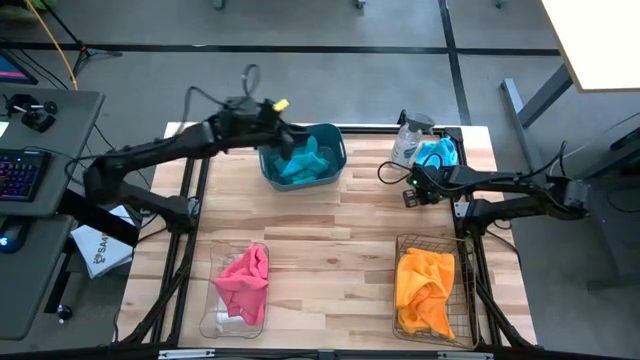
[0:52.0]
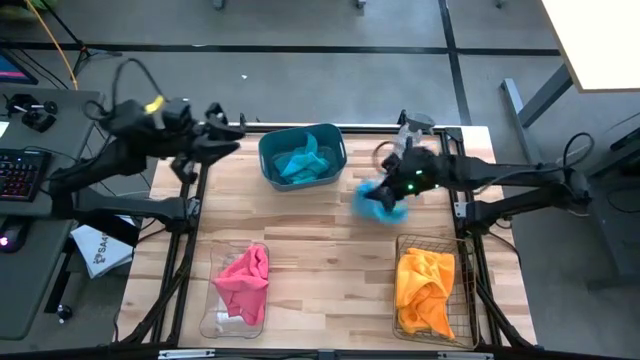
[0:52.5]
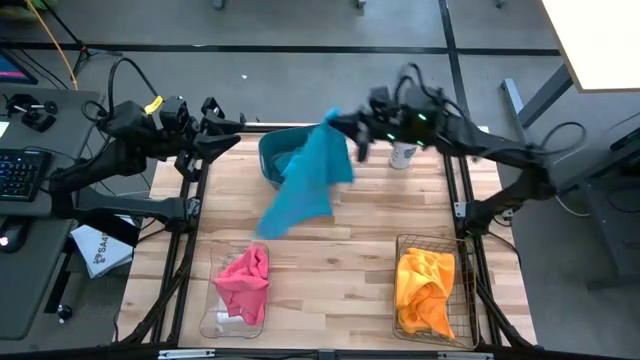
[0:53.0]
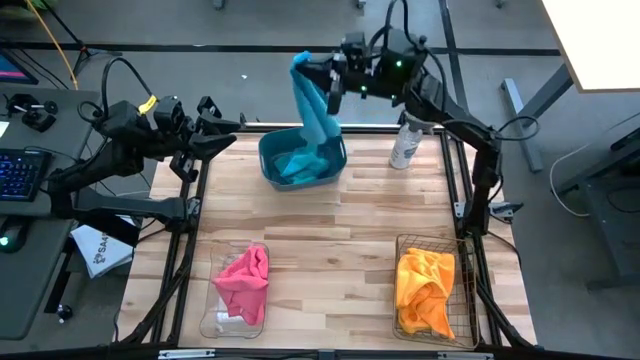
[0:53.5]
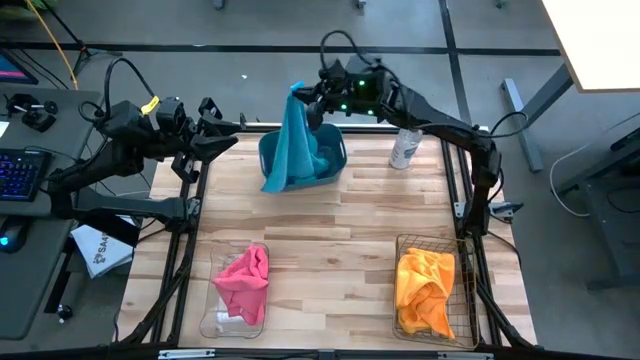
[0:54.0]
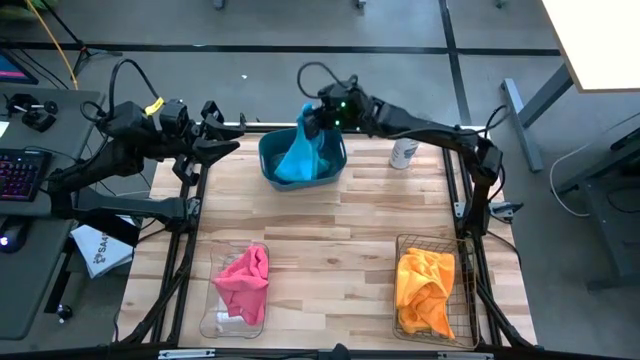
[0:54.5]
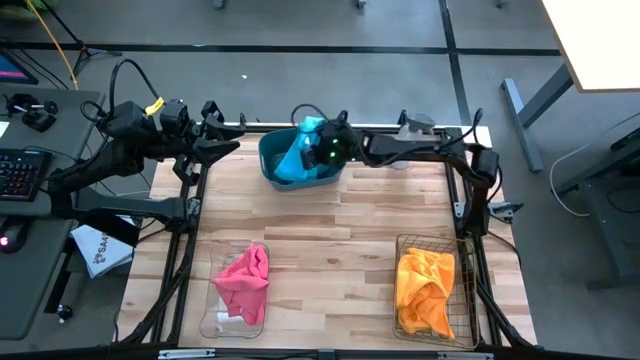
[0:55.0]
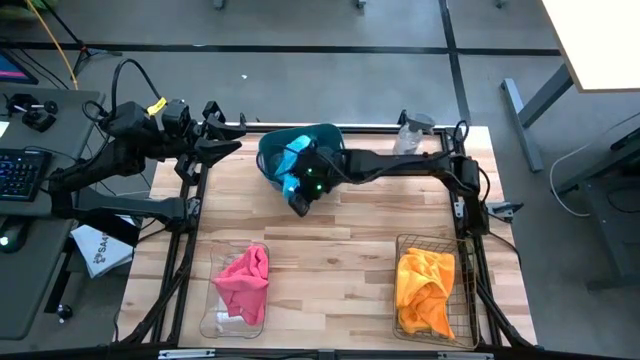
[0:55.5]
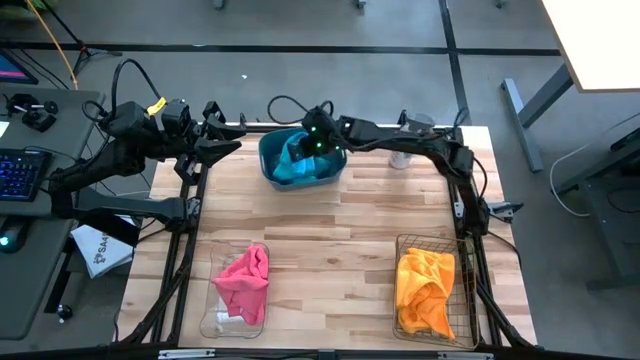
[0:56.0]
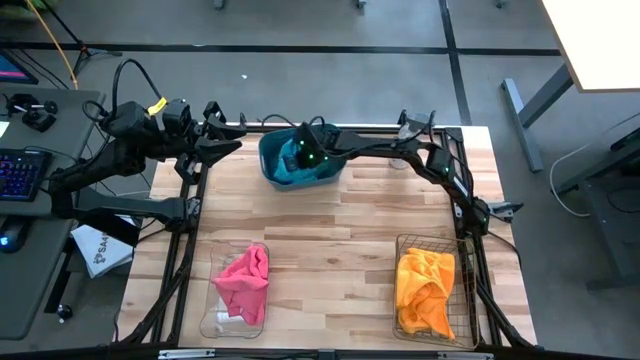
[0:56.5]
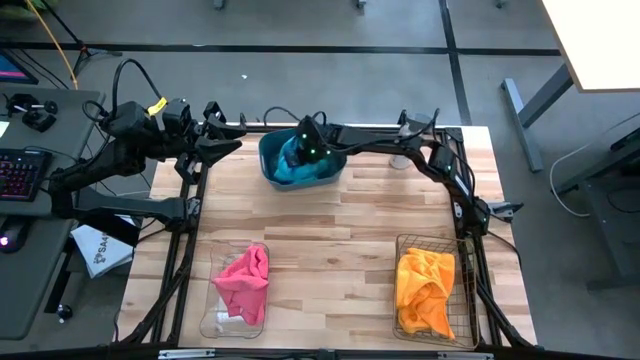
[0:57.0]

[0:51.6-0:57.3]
Task: Sort microfiber towel by color & place in baskets
Put the blue microfiber towel into the blue bin

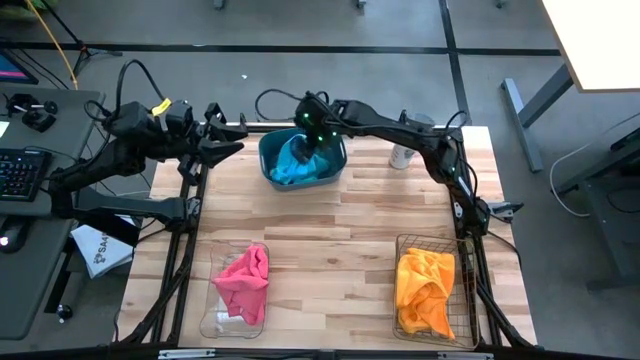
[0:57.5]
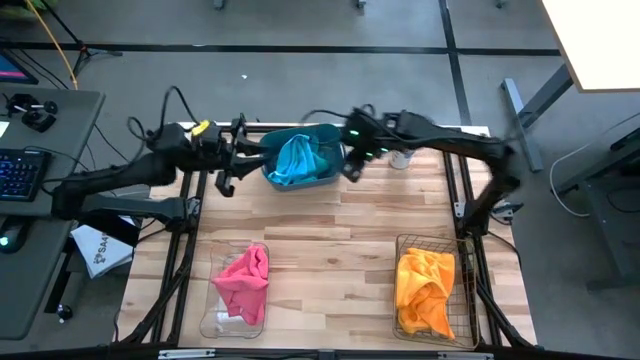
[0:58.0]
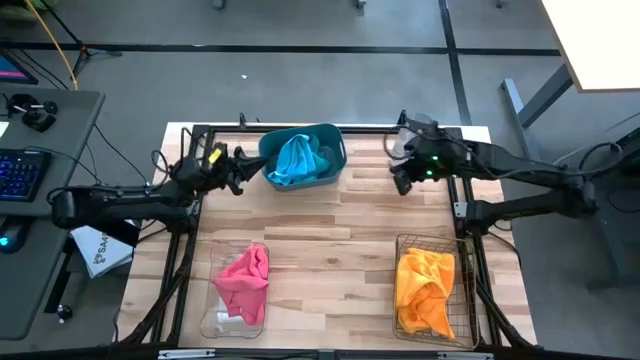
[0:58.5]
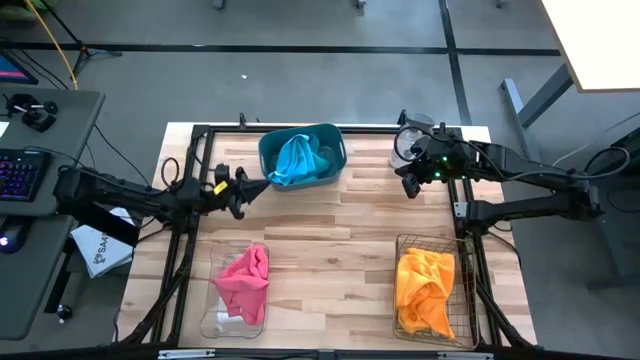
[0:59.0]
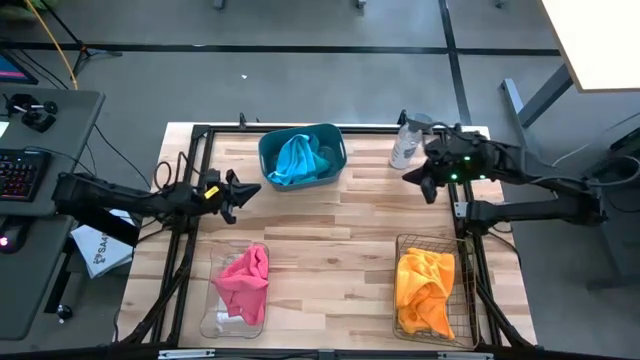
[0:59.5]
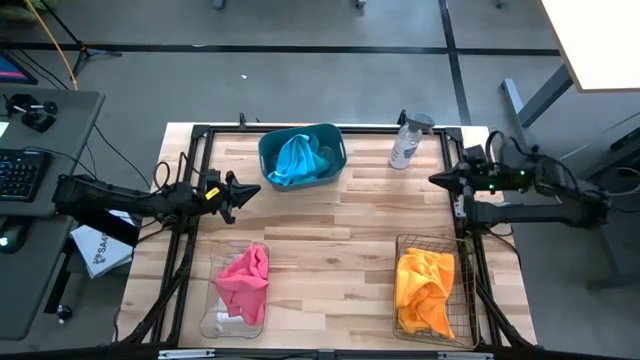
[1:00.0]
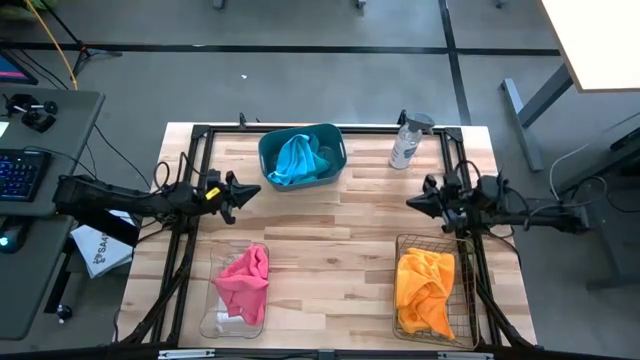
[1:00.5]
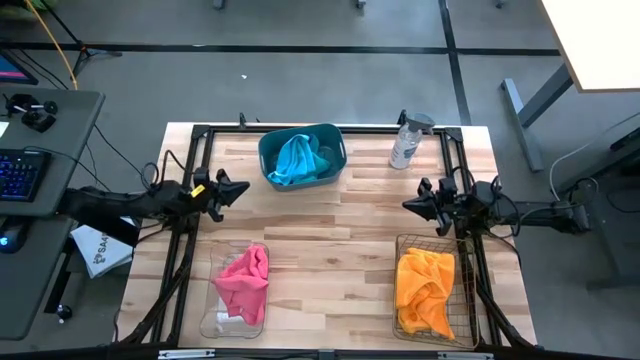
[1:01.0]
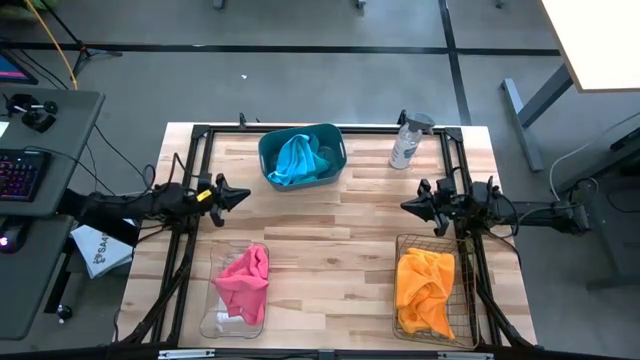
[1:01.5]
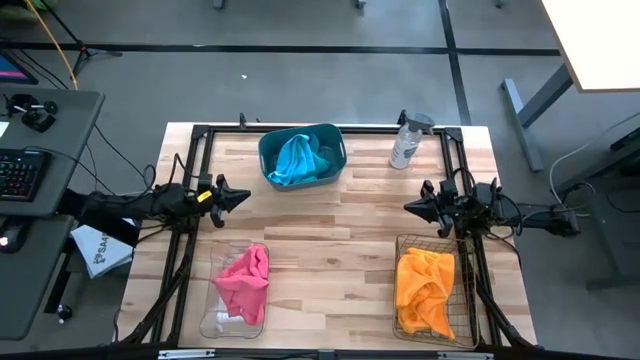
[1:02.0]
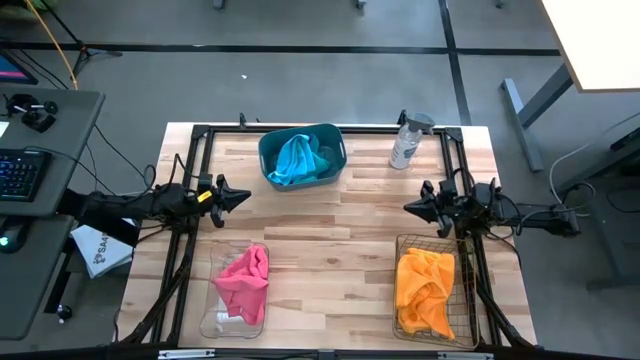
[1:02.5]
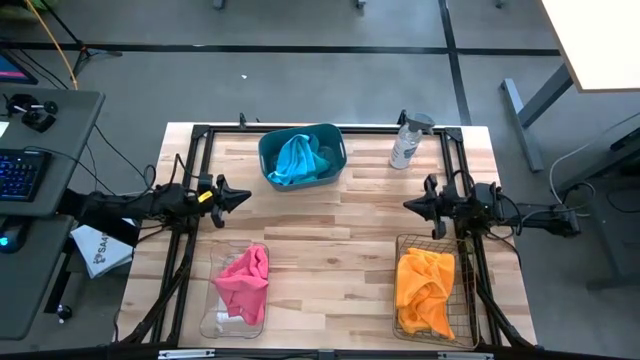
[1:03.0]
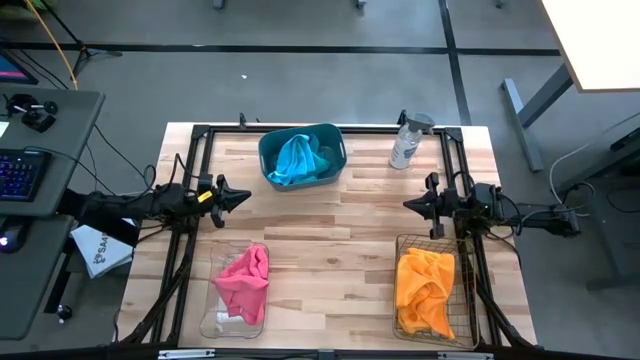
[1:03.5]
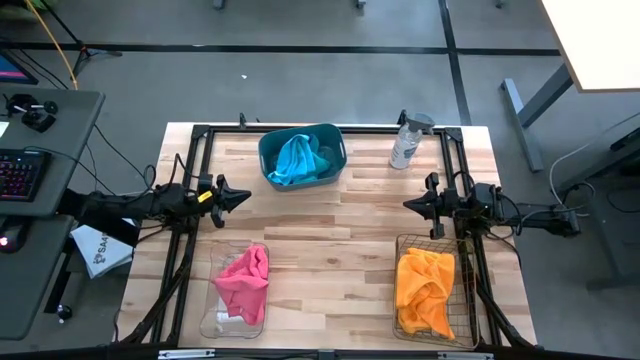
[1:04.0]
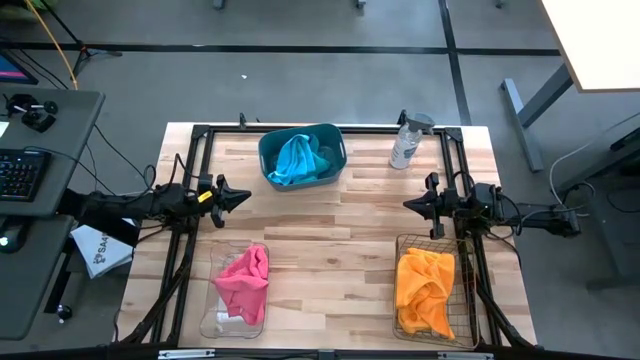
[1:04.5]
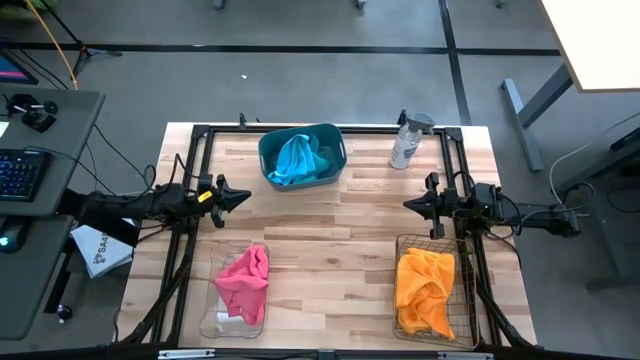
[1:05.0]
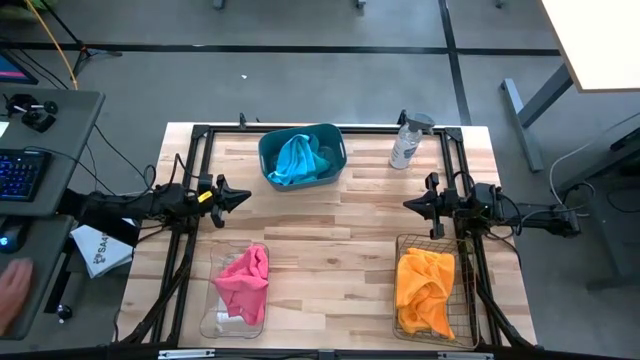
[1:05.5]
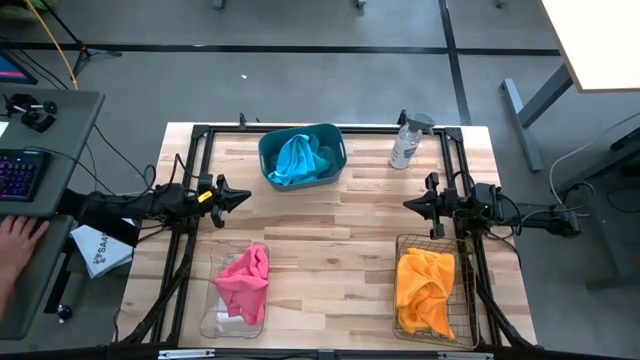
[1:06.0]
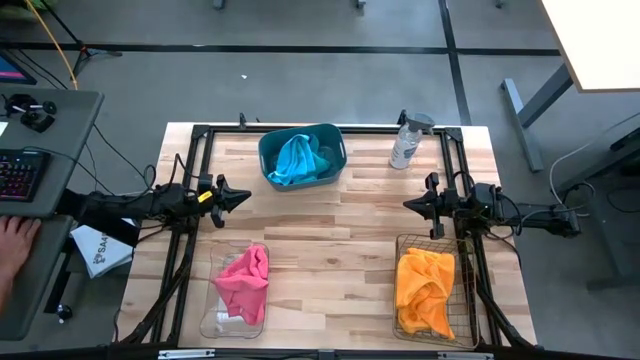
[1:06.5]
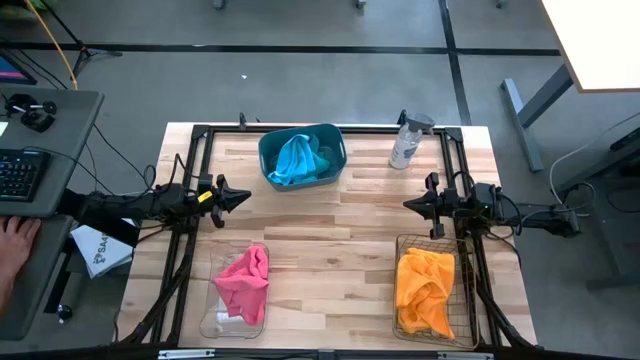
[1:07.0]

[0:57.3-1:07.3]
Return to Home Position

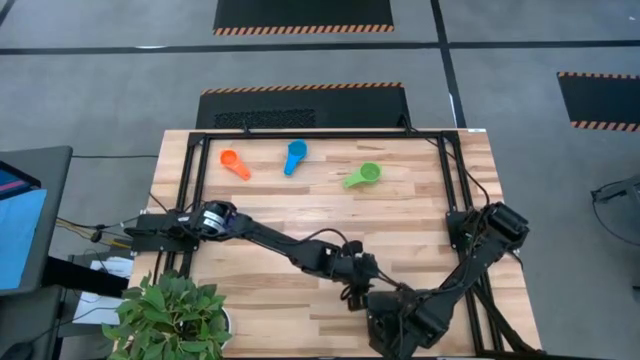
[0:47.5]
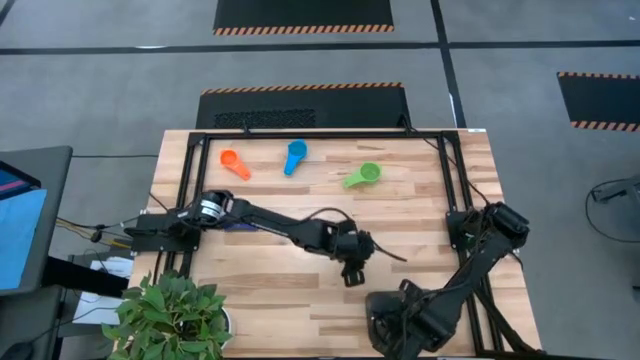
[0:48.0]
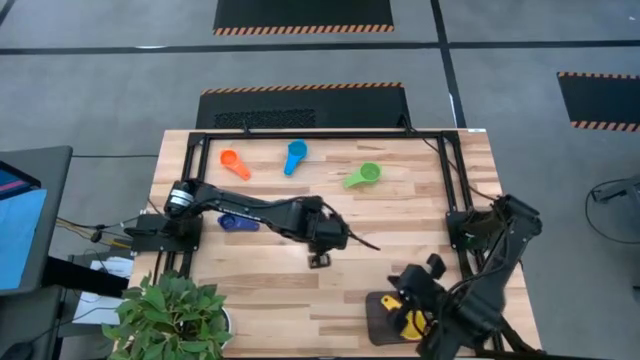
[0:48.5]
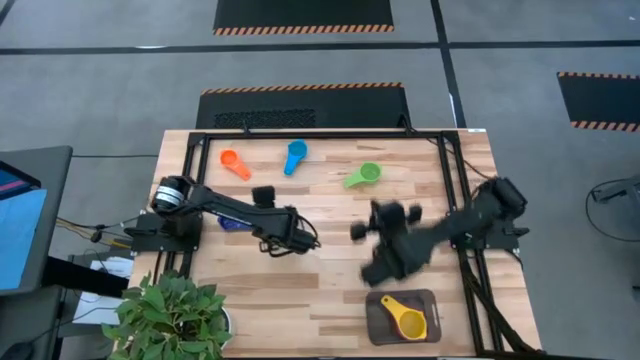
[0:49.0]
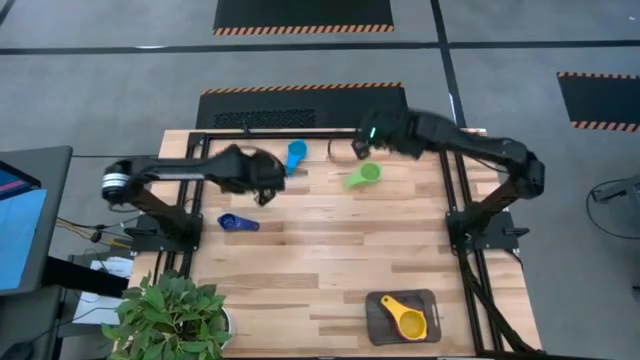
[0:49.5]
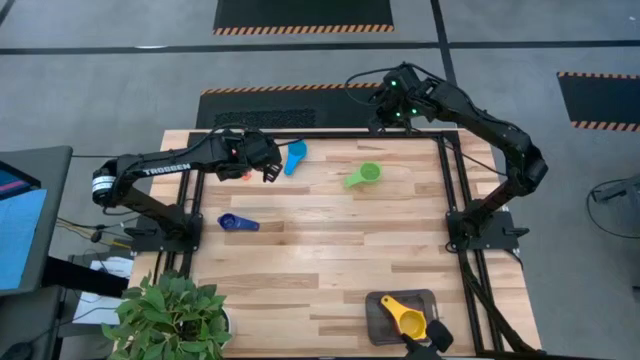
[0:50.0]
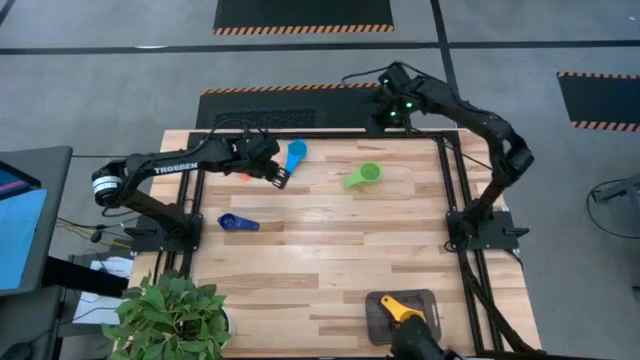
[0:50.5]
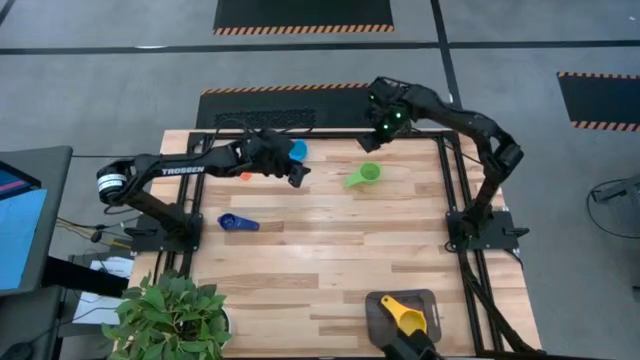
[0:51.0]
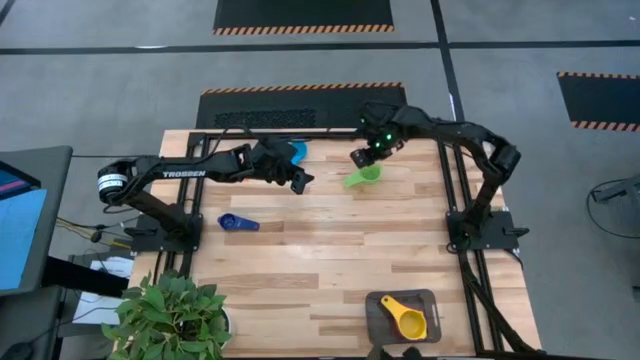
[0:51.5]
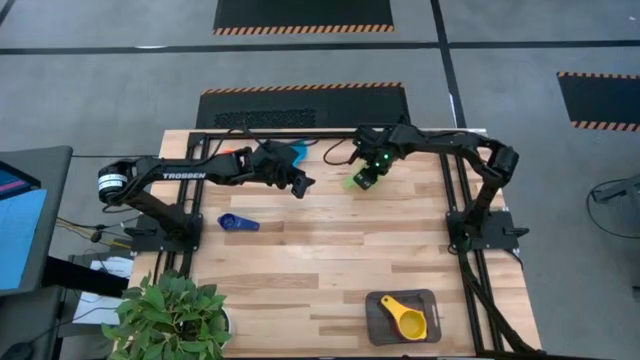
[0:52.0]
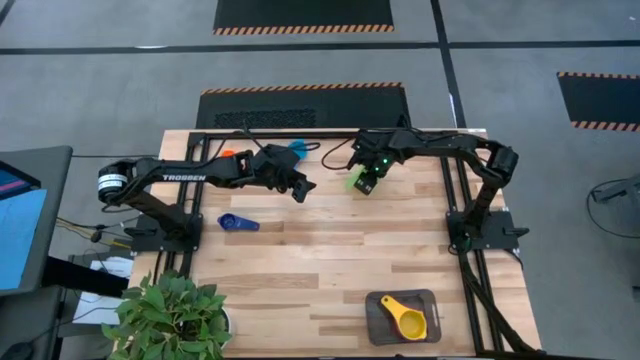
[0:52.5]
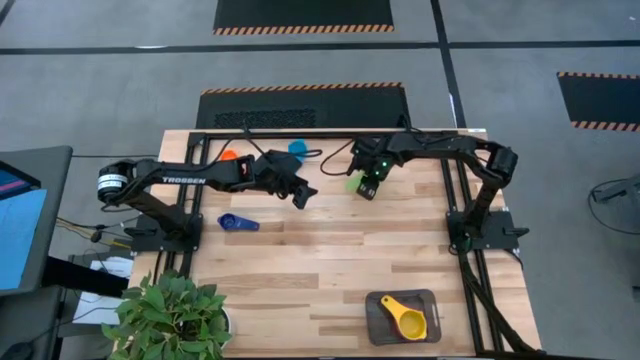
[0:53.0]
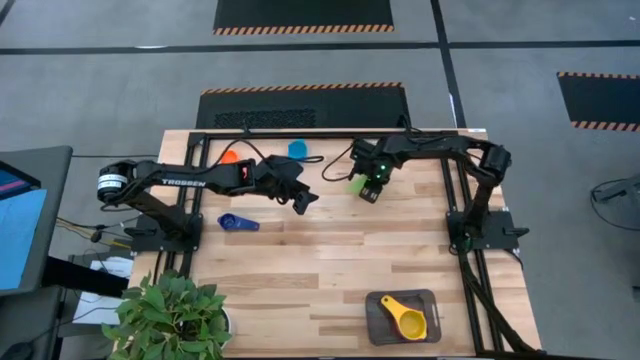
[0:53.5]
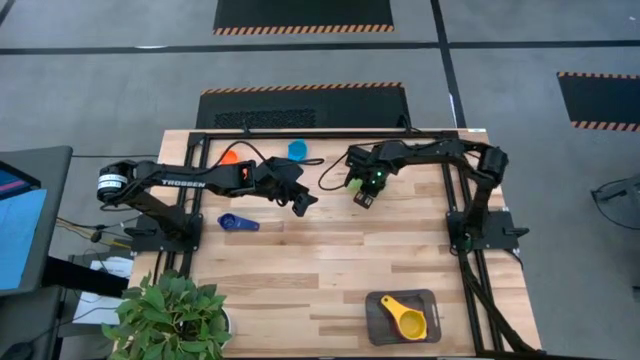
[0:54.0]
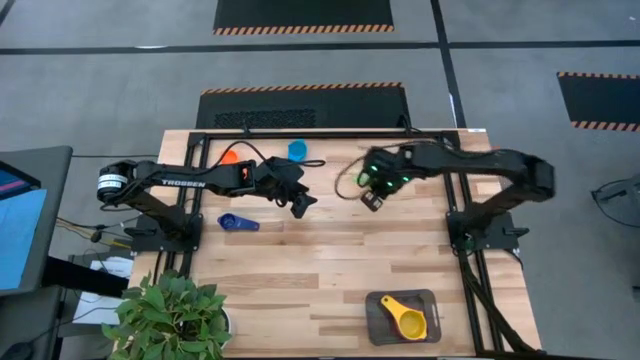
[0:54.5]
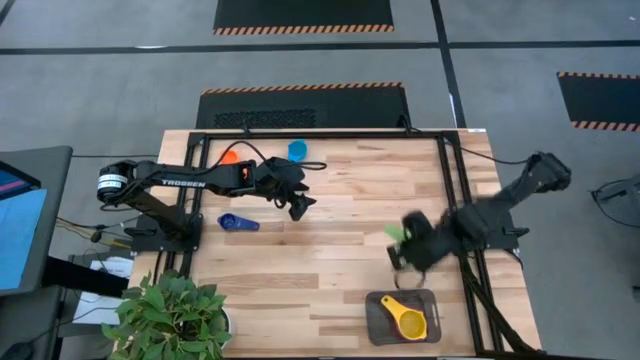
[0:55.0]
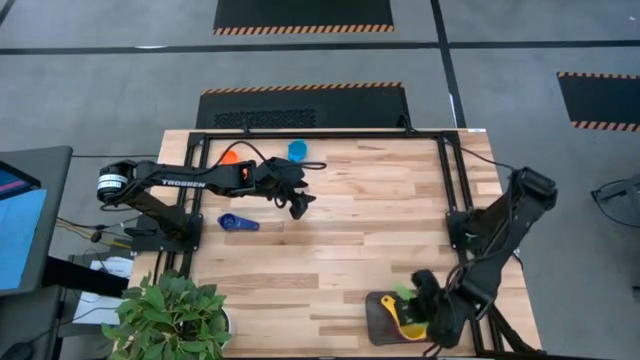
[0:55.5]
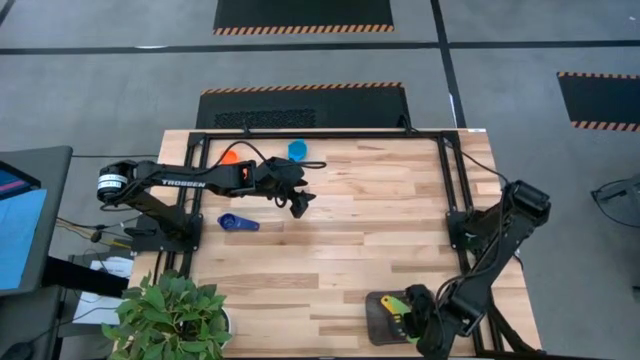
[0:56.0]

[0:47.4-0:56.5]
Task: Nest measuring cups in basket
Stack the green measuring cup on top of the yellow measuring cup in the black bin
